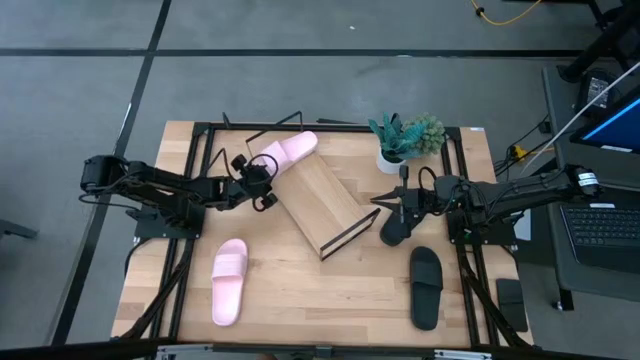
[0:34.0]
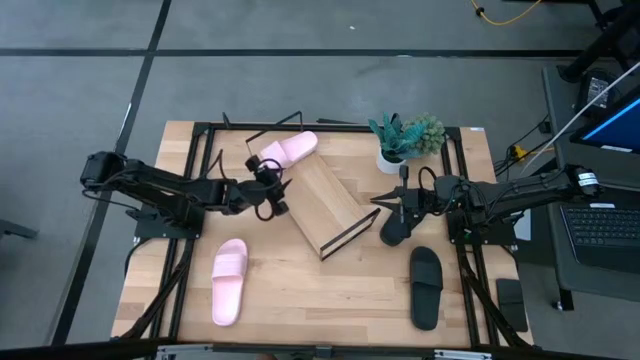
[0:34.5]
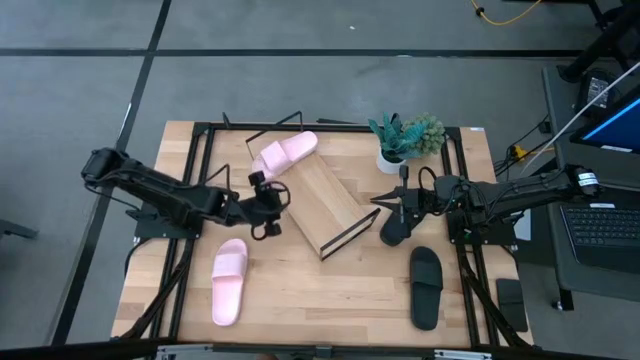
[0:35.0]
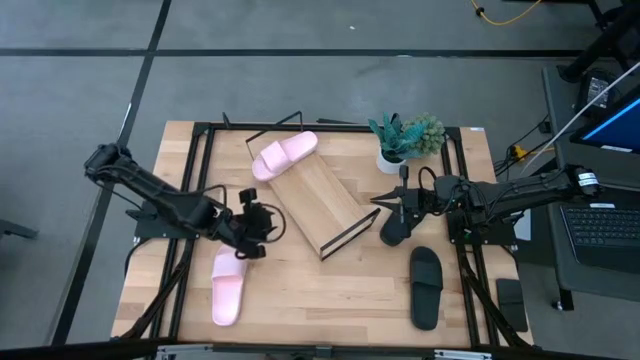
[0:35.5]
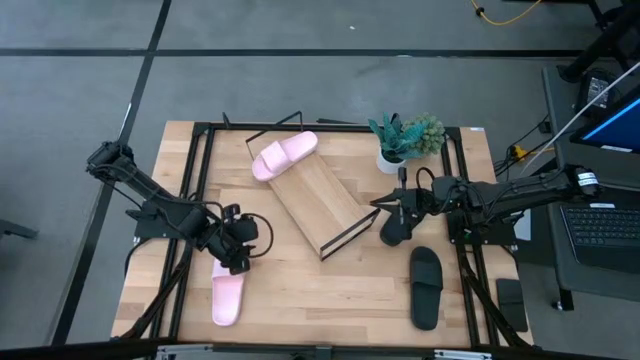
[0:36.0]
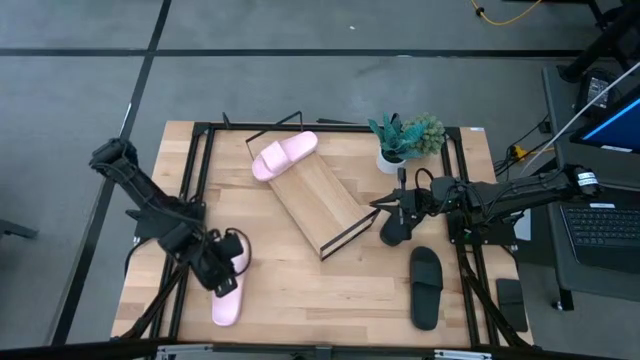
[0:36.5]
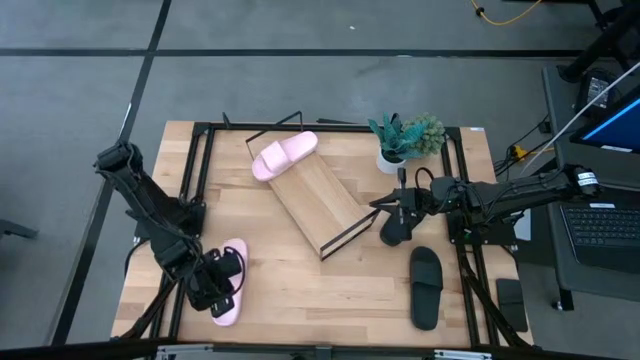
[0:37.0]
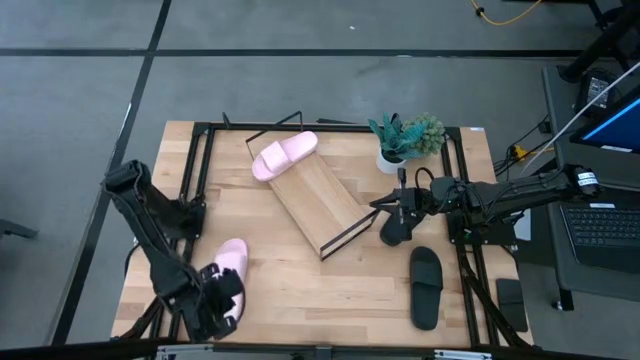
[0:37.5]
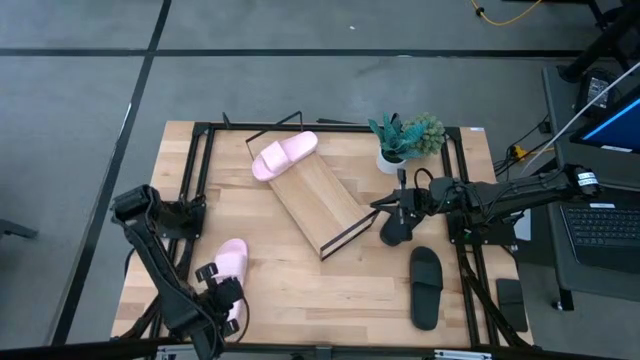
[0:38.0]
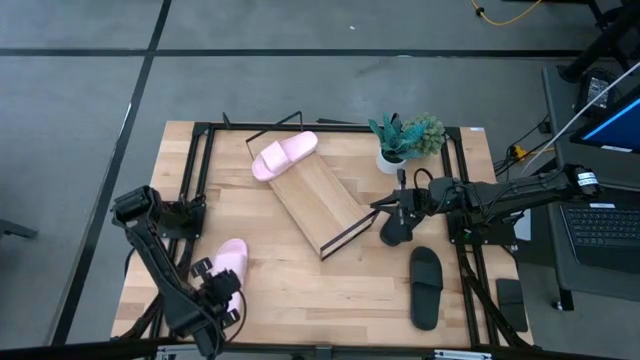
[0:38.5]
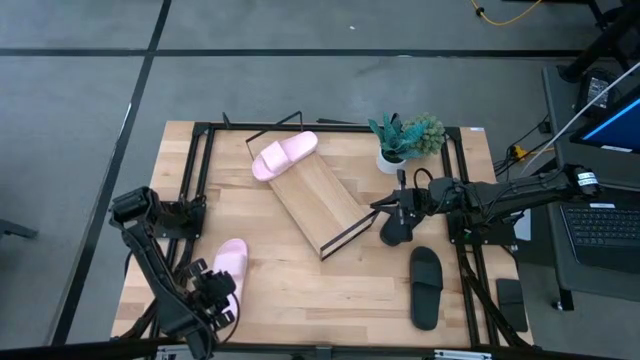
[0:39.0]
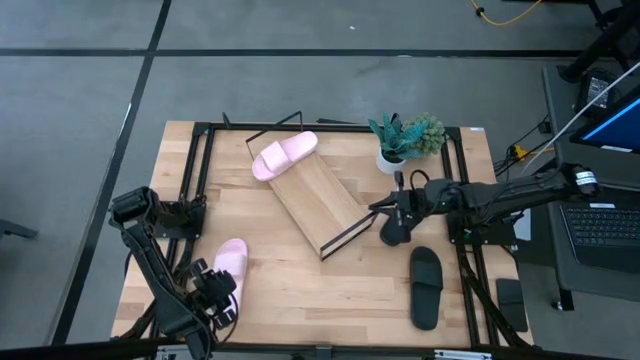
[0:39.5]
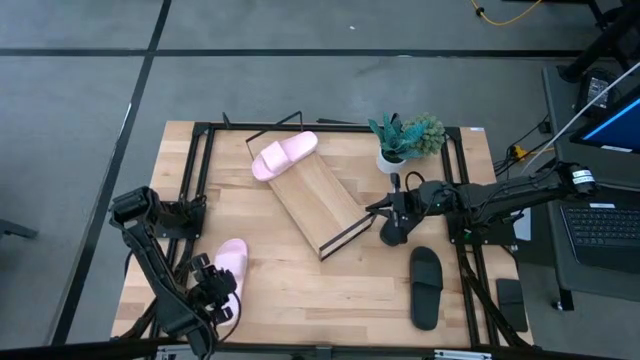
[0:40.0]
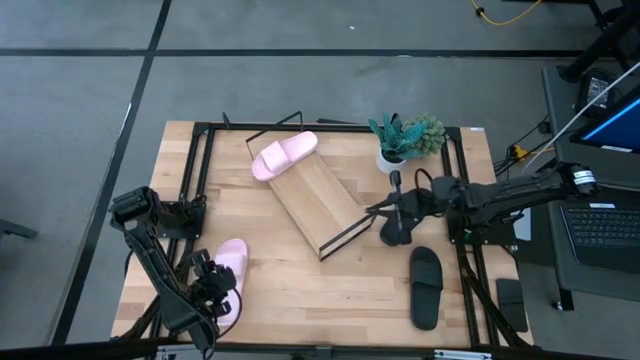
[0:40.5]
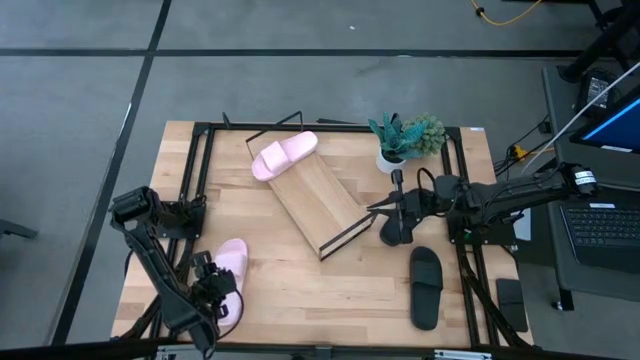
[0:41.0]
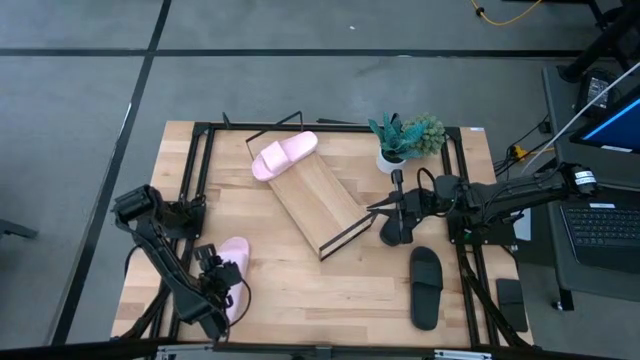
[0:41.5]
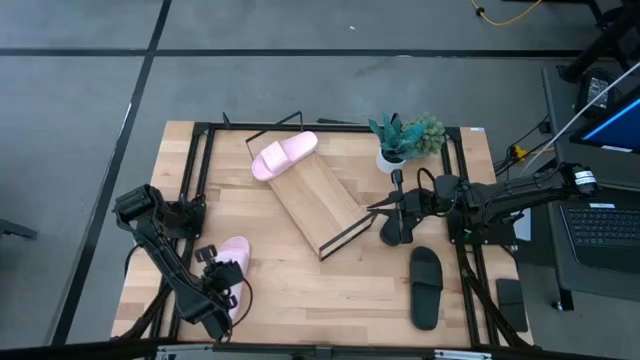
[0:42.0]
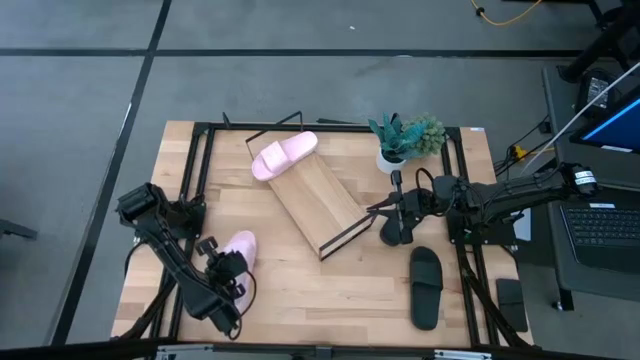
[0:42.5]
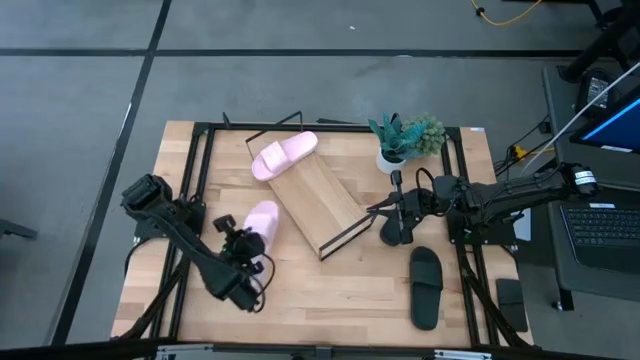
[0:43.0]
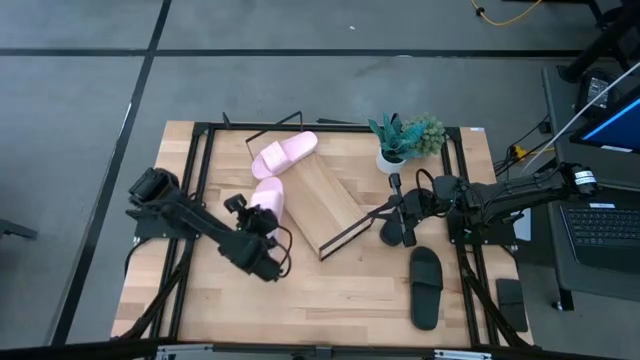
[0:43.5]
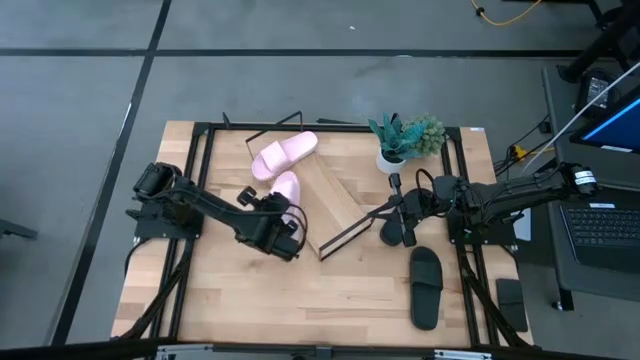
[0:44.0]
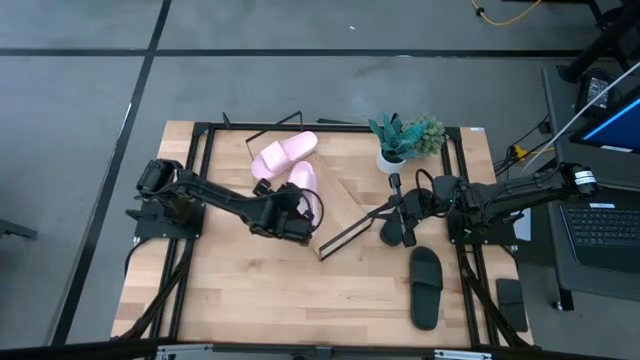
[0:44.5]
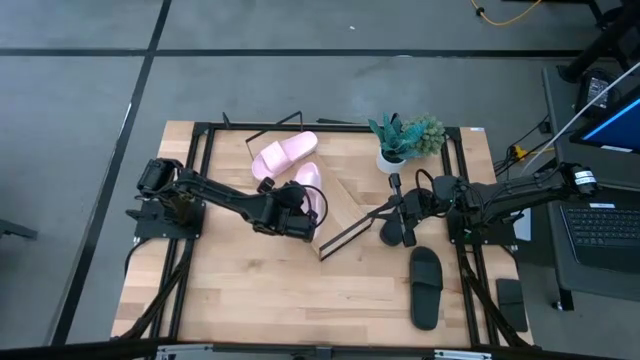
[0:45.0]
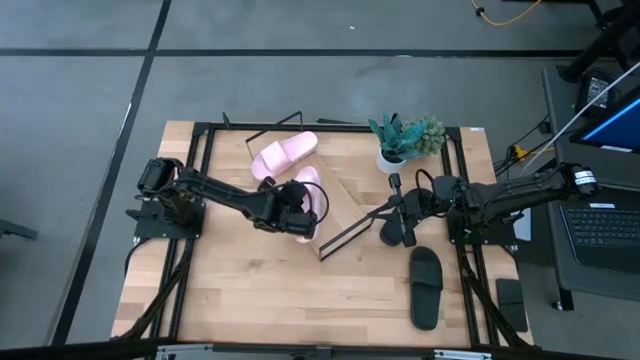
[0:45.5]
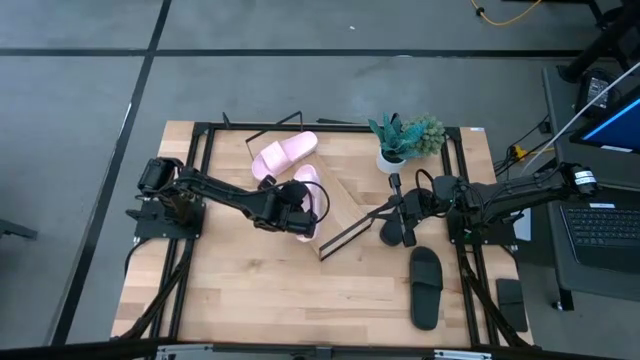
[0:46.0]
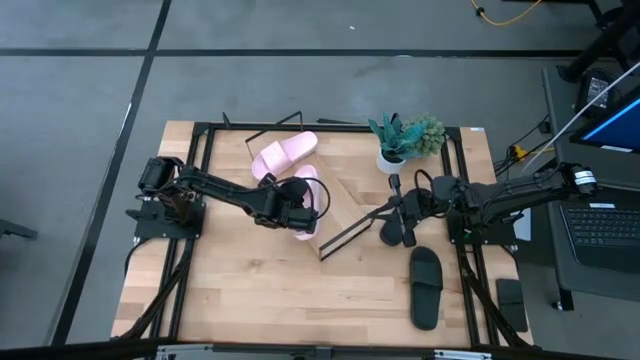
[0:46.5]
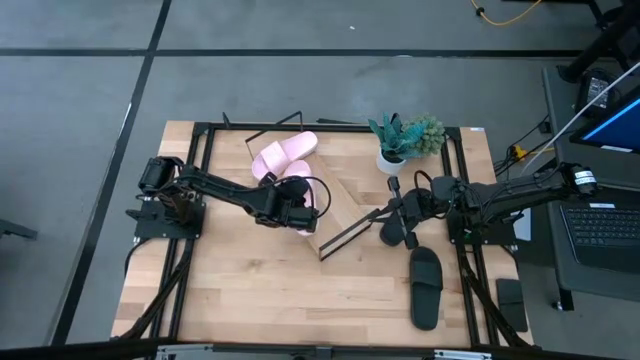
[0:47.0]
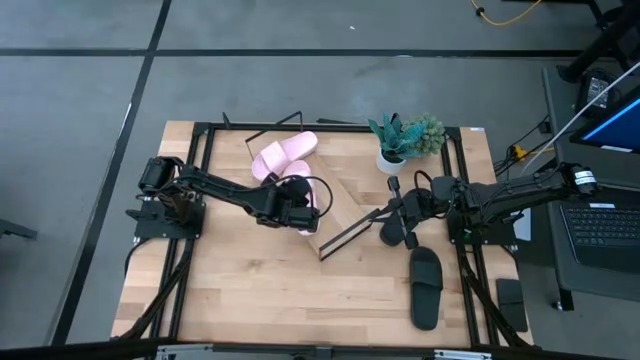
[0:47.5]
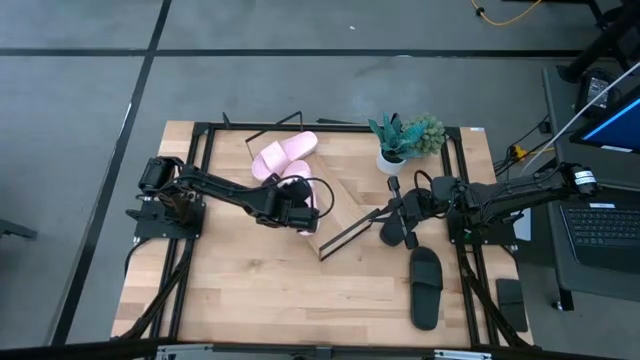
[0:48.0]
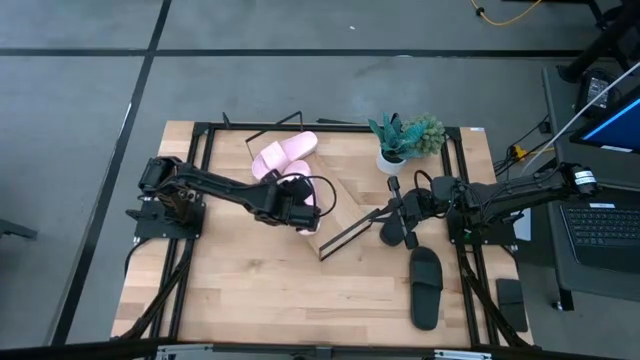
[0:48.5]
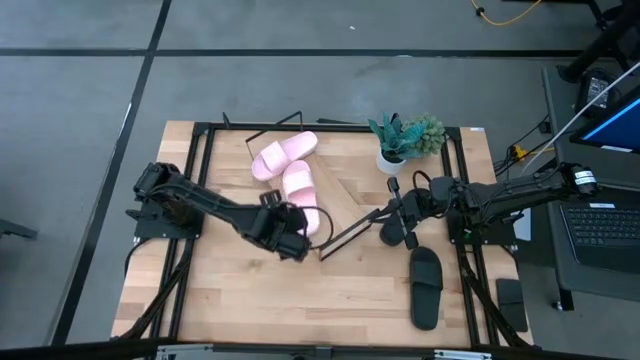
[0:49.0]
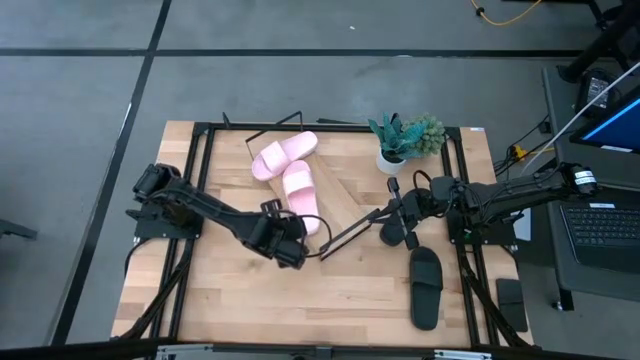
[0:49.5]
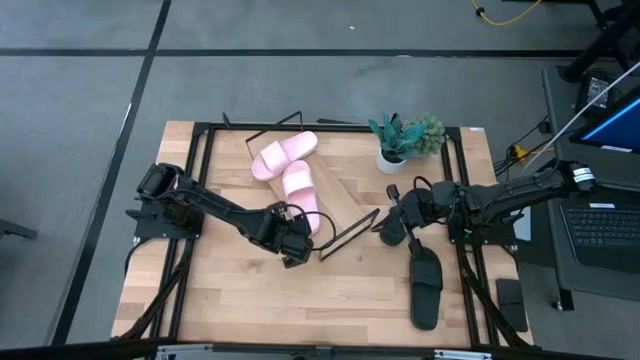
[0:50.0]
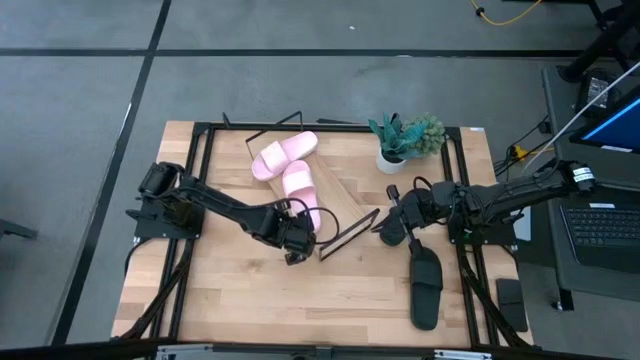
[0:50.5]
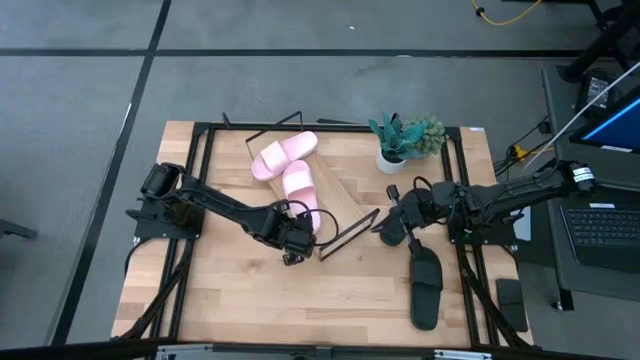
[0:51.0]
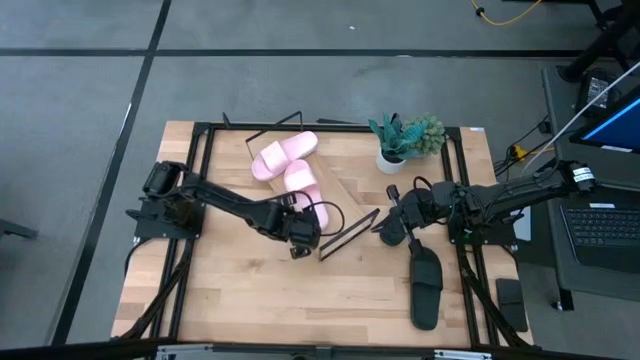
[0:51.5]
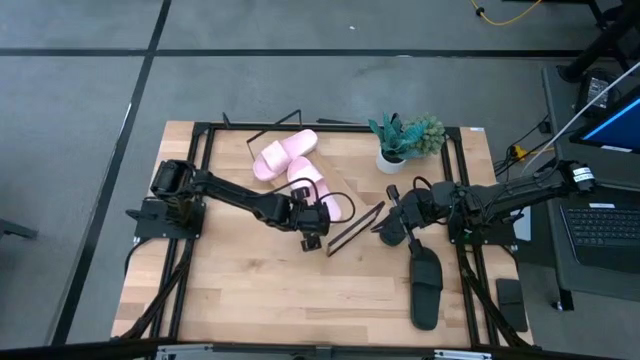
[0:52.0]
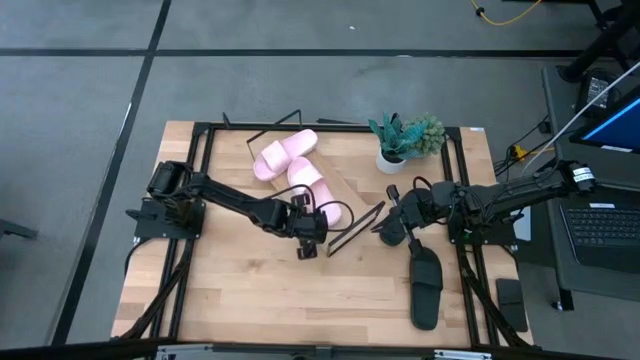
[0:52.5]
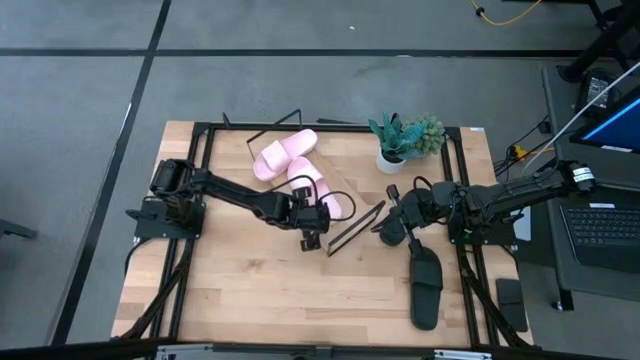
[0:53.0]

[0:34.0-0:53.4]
Task: Pick and place slides into the shelf
Put the pink slides on the shelf
